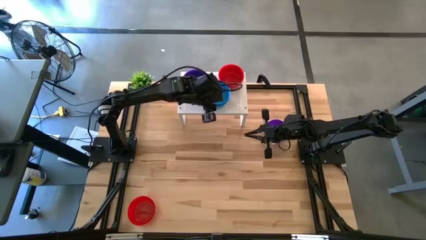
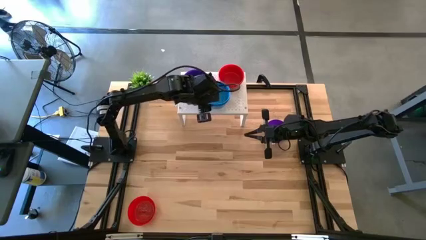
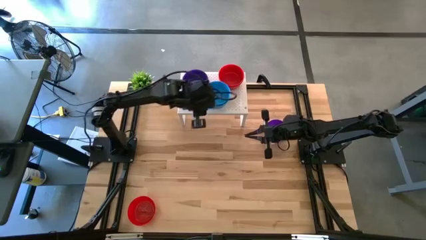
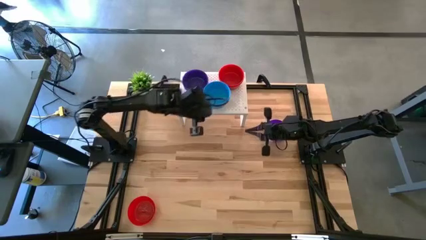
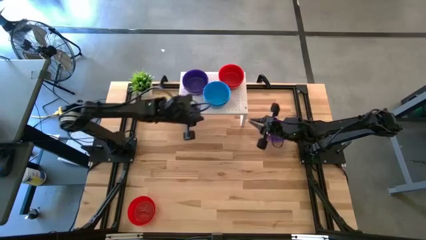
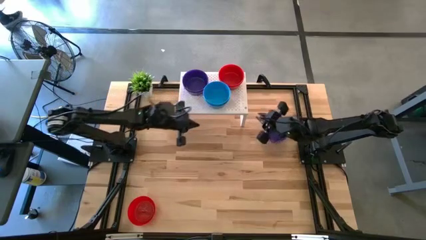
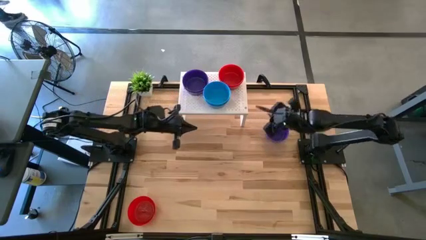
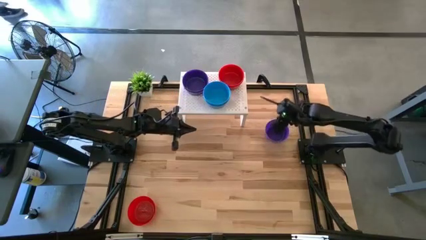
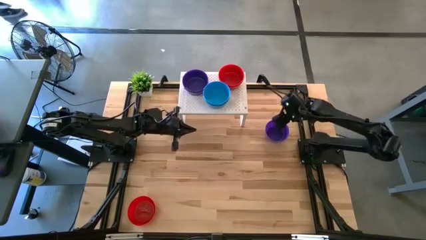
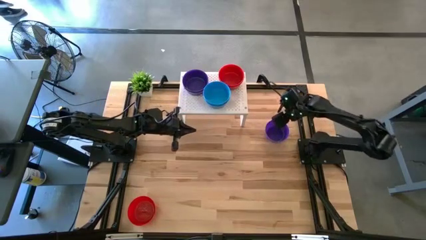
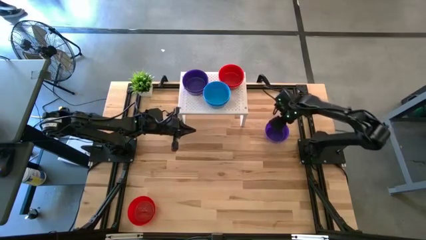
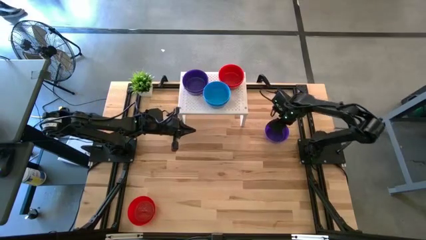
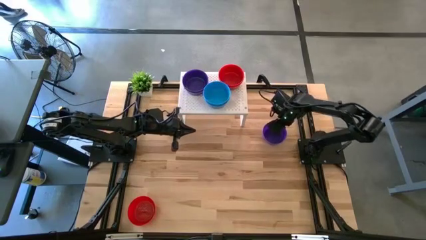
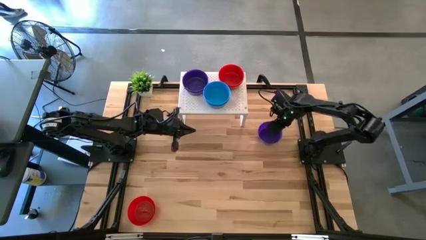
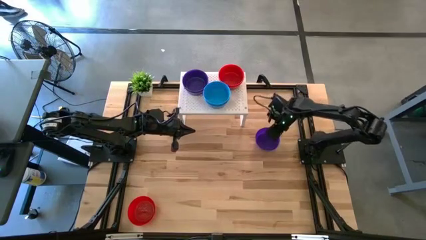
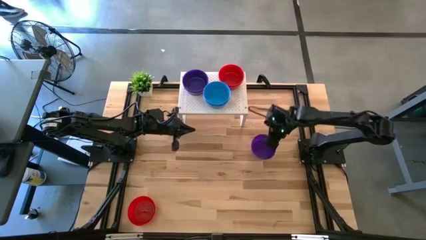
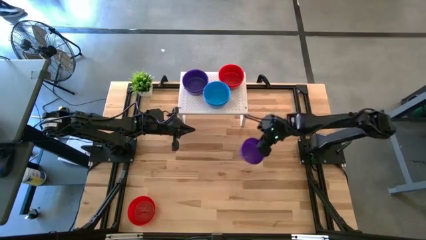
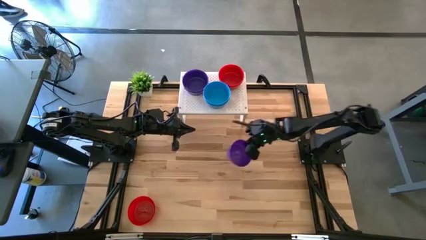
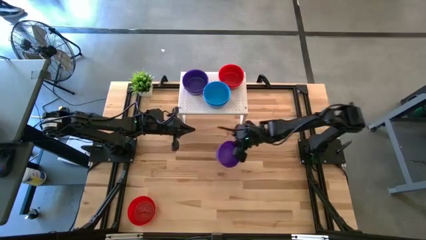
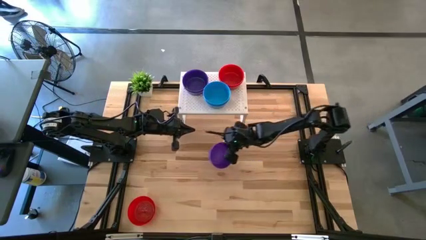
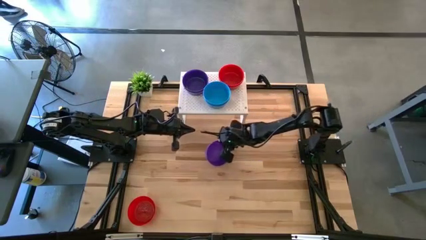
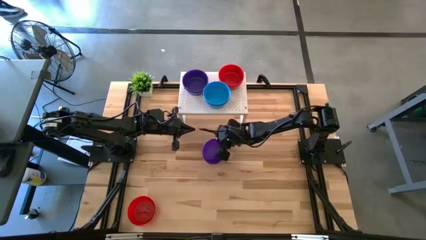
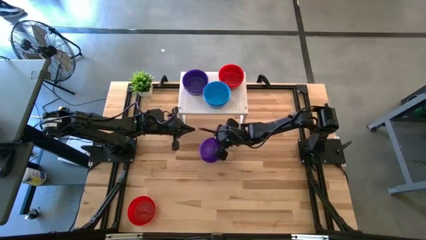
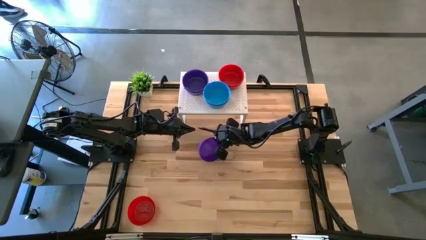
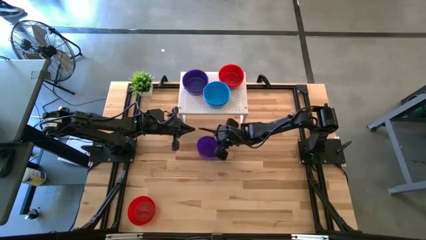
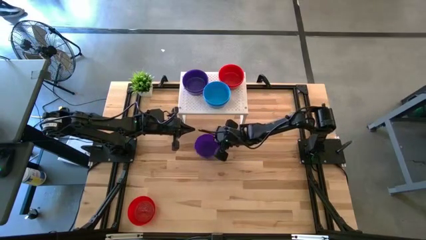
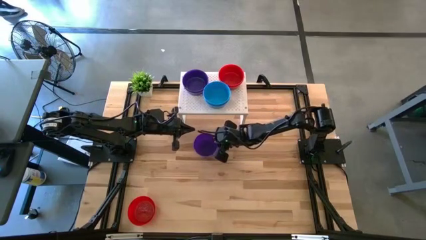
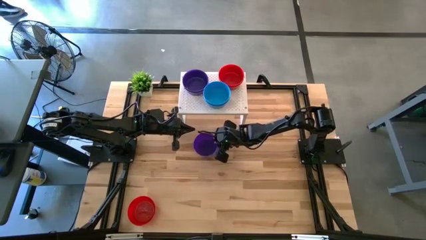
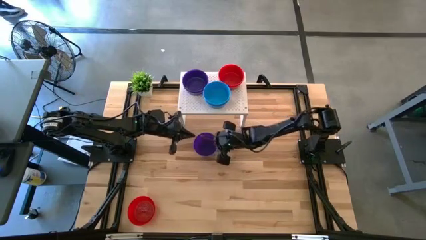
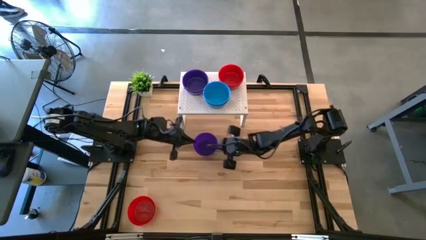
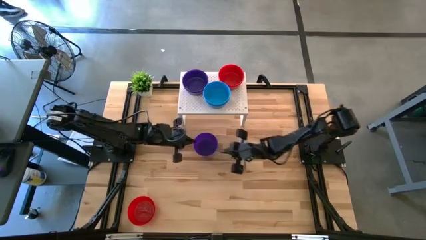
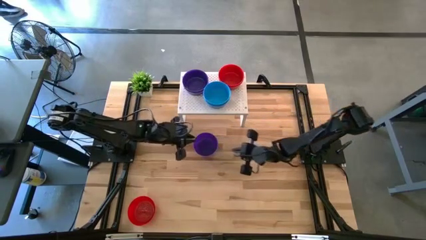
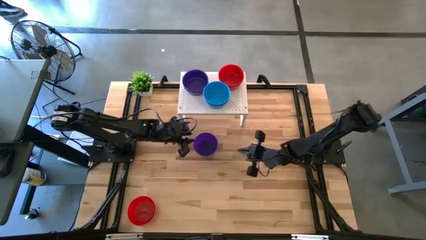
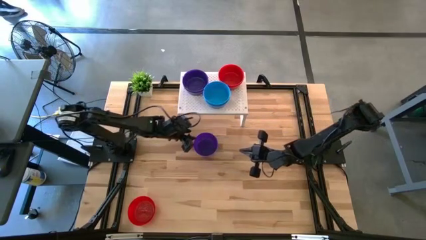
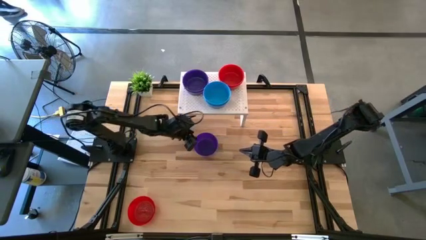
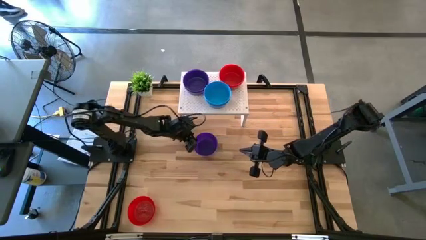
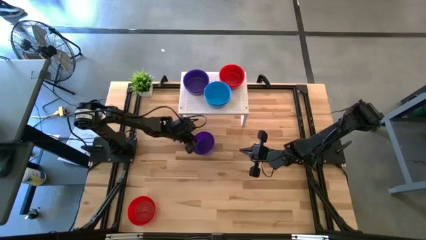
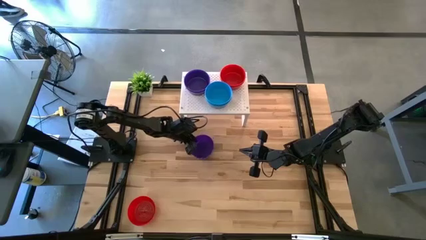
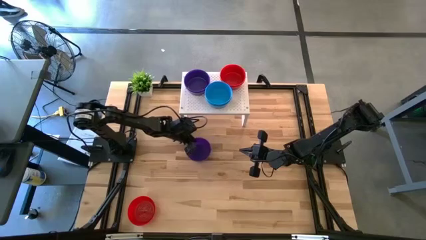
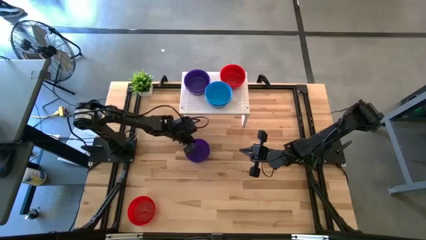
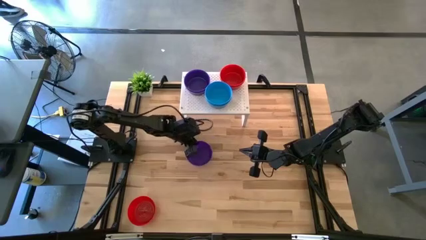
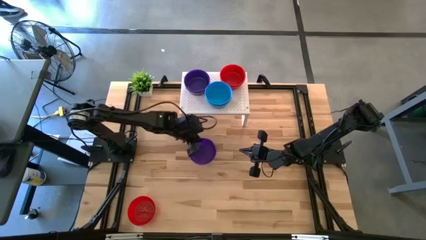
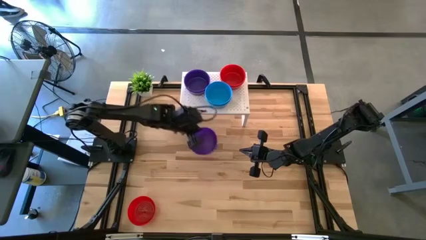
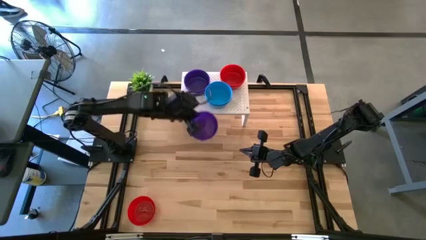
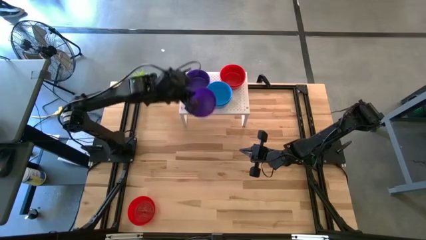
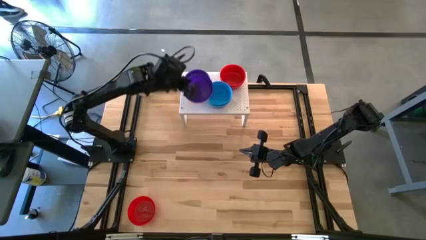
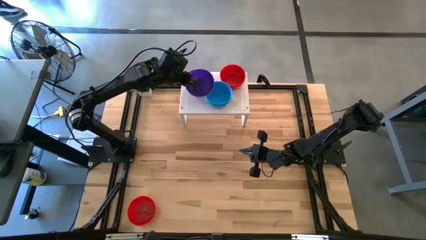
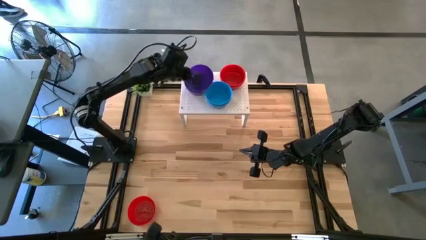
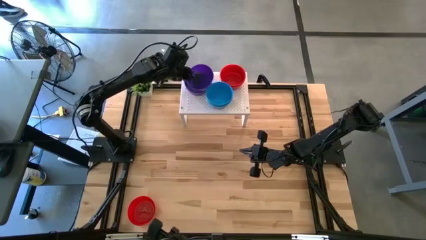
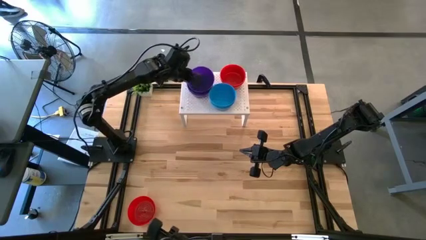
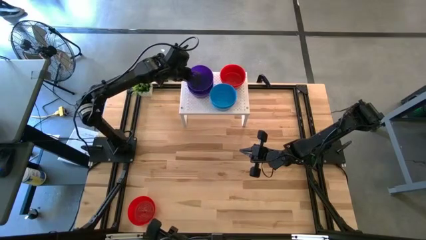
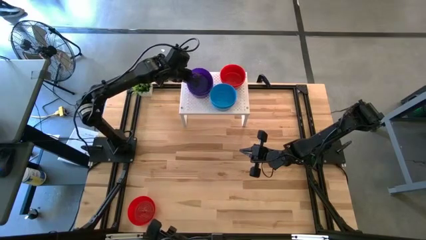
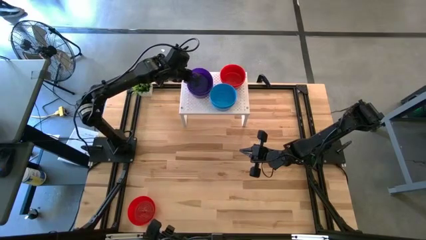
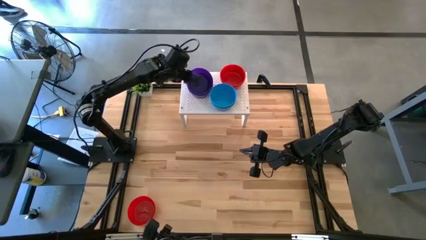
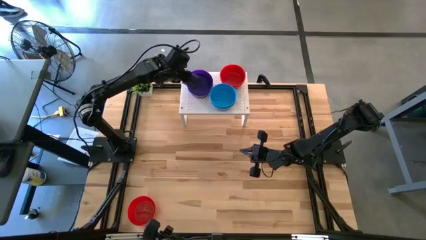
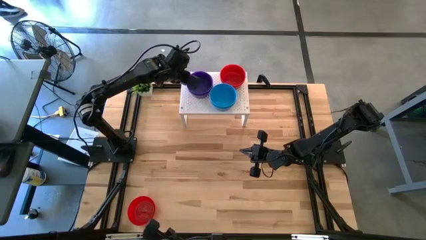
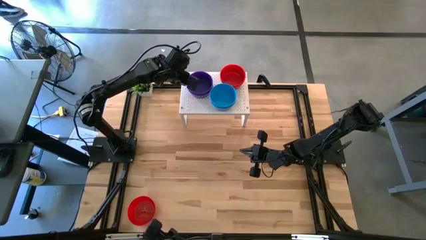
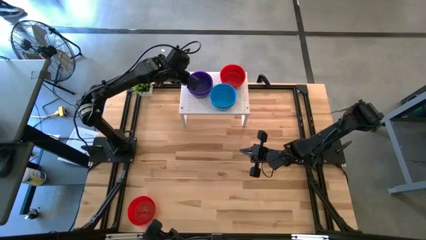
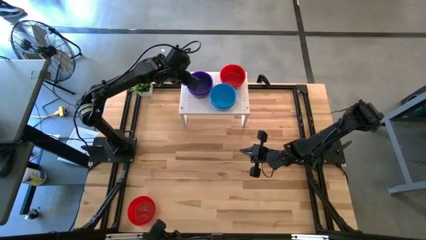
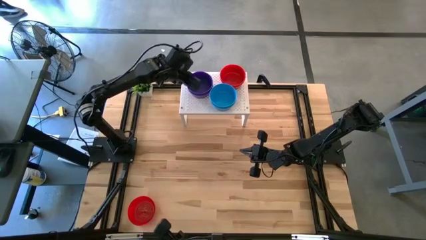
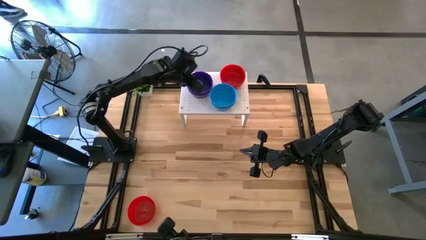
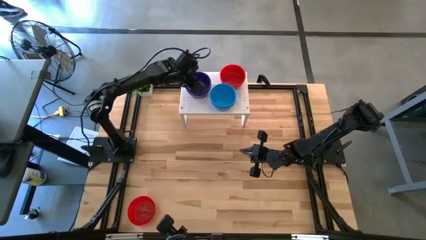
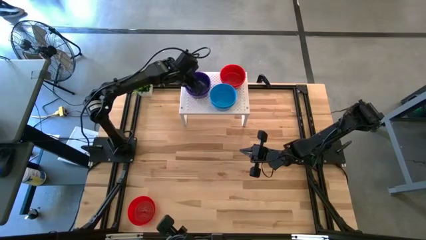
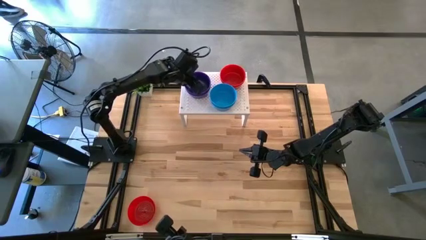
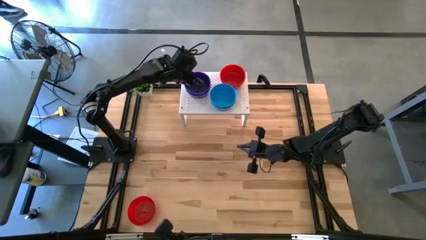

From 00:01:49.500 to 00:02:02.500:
Task: Pick & Place Mini bowls
Stack the purple bowl on the purple bowl on the shelf

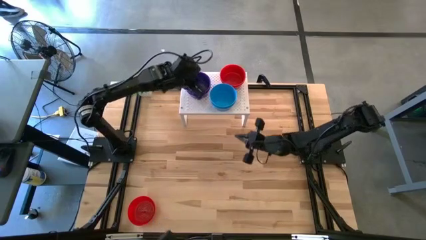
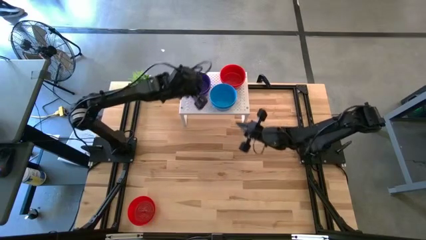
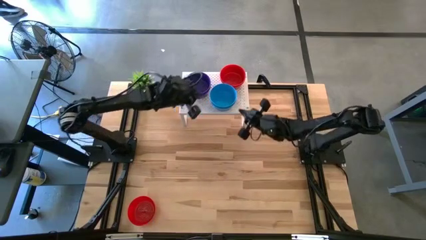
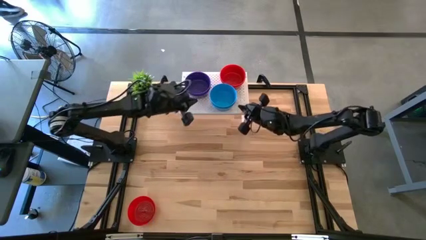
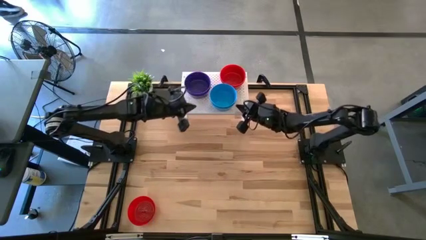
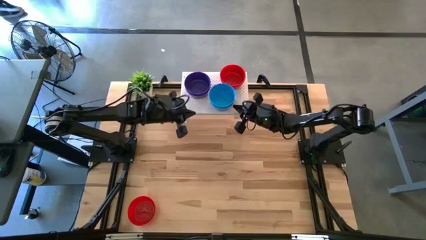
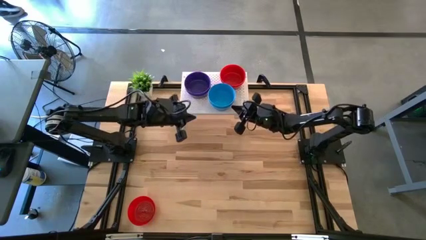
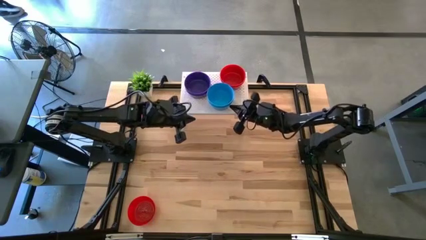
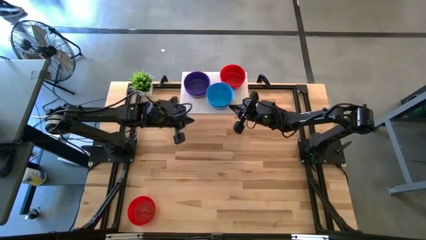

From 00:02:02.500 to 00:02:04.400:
Adjust the stacked blue bowls

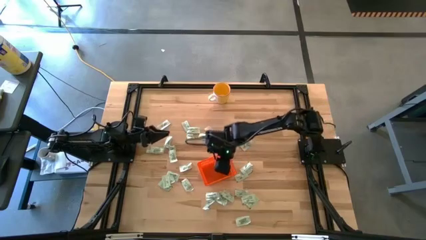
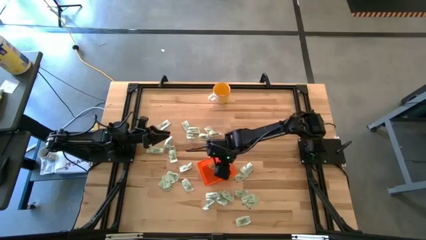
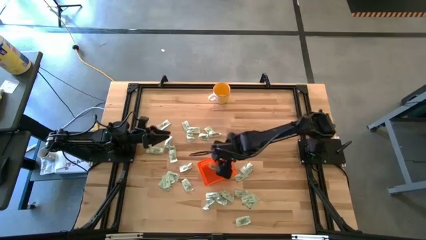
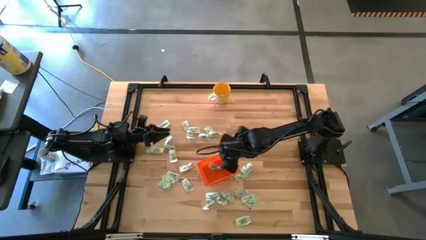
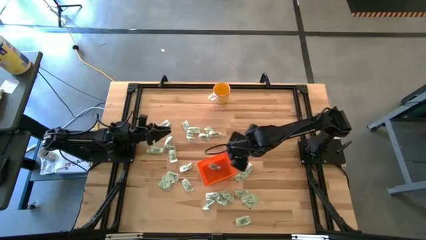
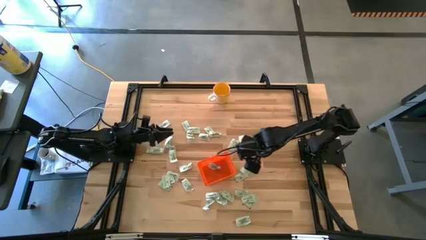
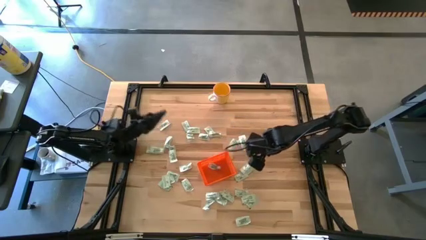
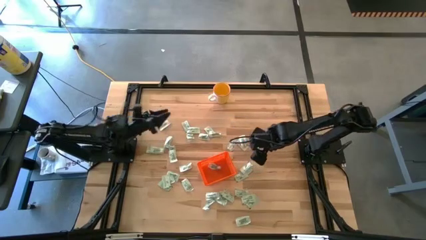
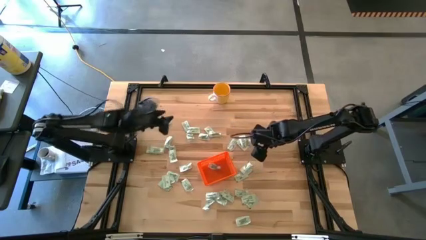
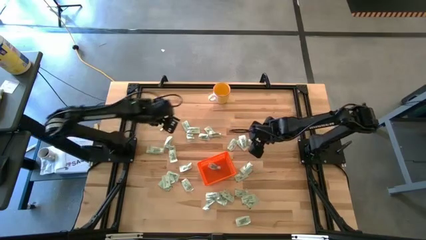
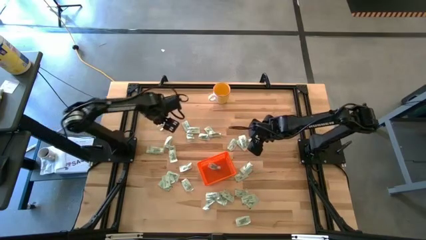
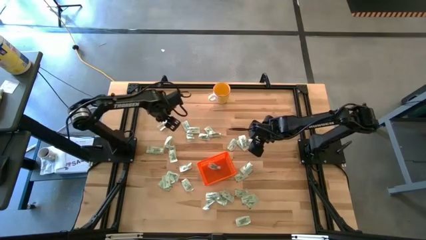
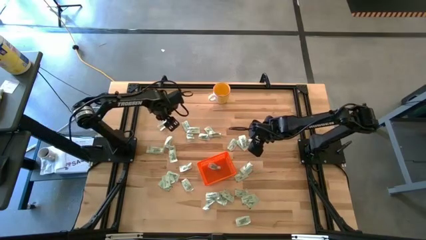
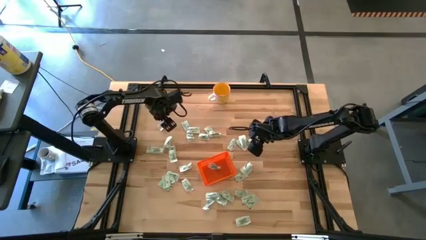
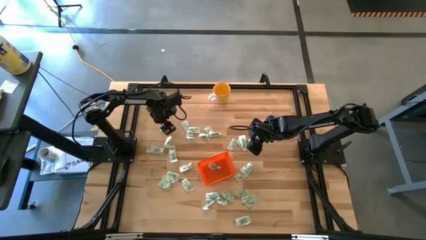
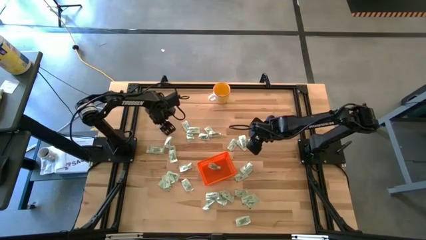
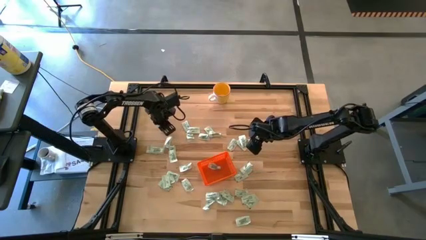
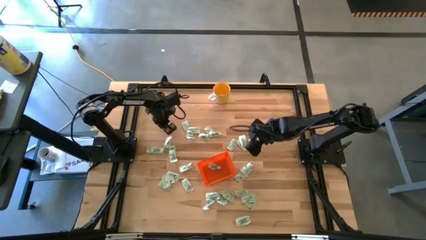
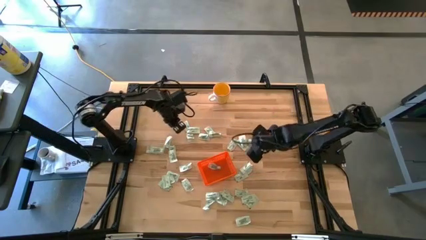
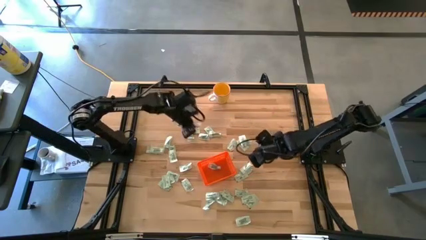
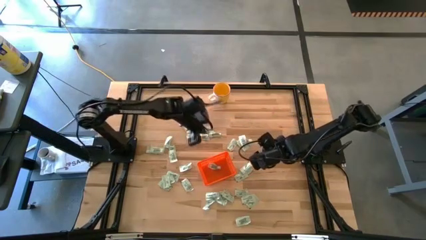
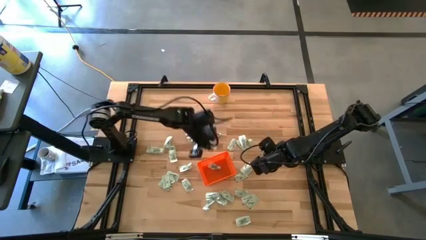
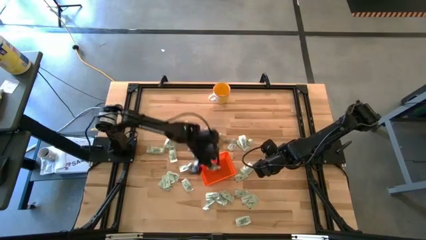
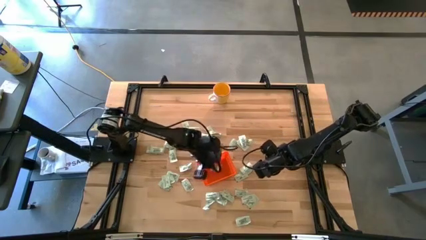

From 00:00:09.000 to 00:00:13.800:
Task: Pick and place Stevia / Truvia into bins
Put the stevia packet into the bin
